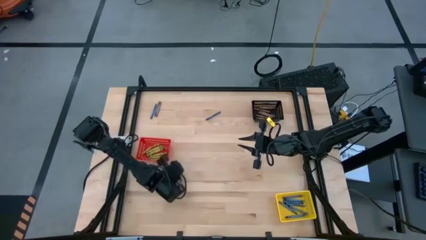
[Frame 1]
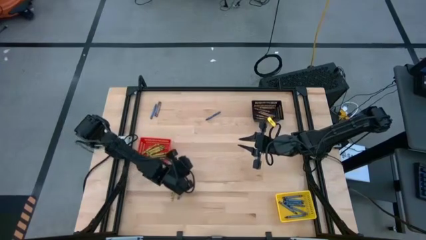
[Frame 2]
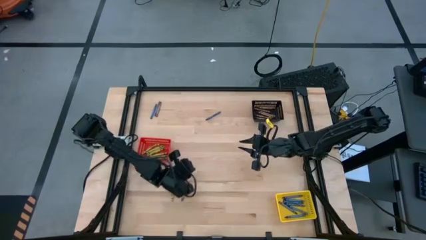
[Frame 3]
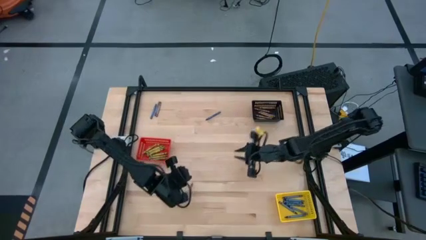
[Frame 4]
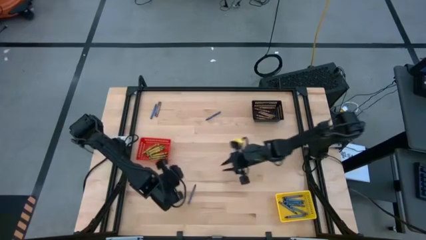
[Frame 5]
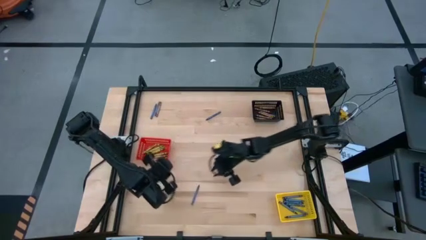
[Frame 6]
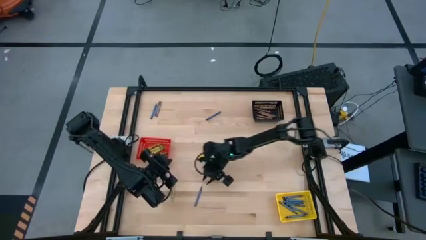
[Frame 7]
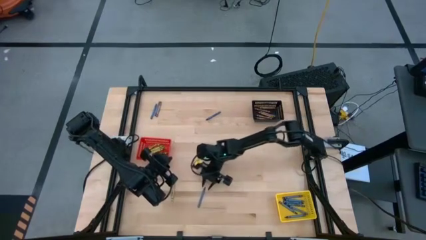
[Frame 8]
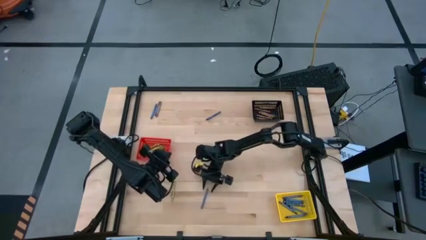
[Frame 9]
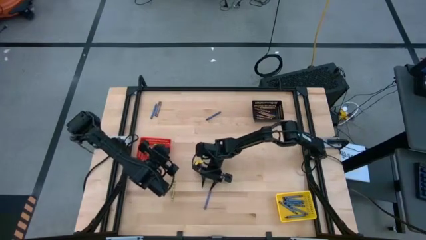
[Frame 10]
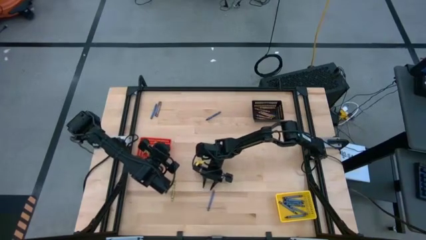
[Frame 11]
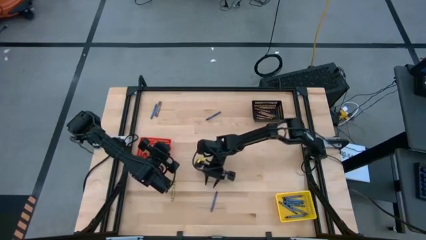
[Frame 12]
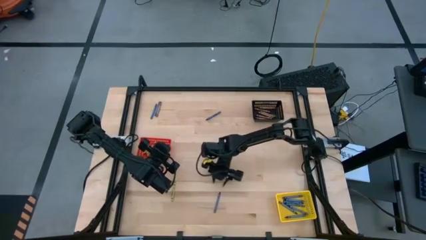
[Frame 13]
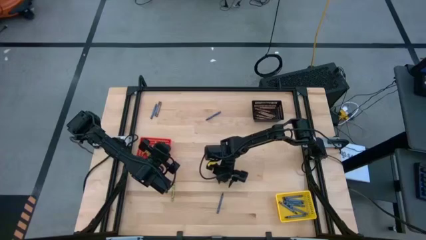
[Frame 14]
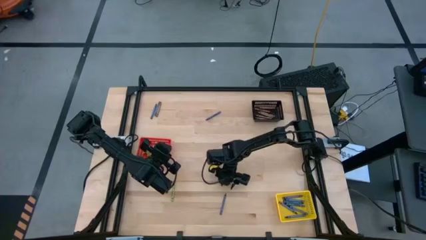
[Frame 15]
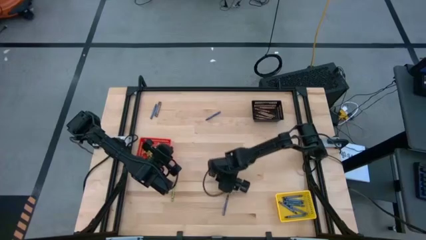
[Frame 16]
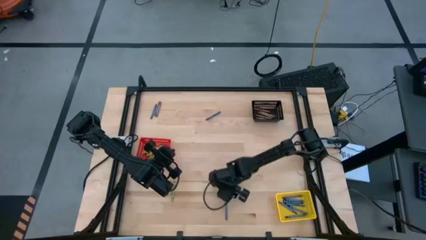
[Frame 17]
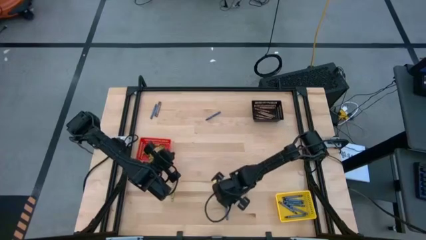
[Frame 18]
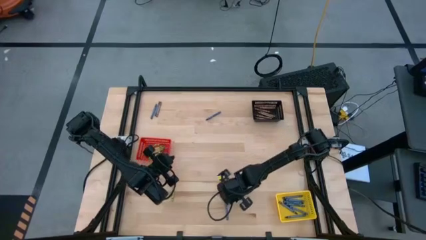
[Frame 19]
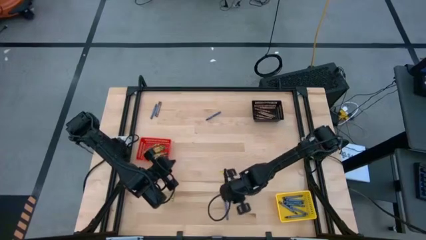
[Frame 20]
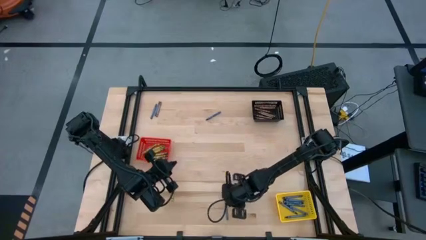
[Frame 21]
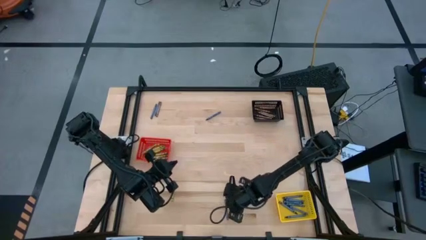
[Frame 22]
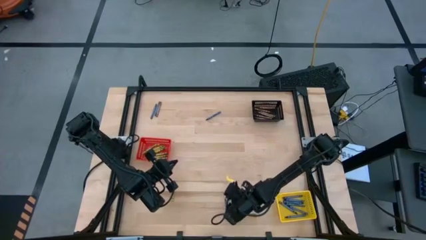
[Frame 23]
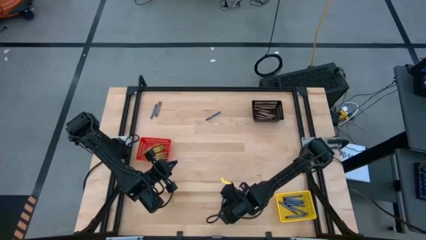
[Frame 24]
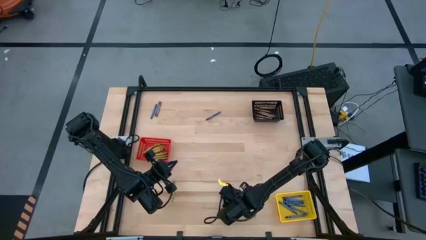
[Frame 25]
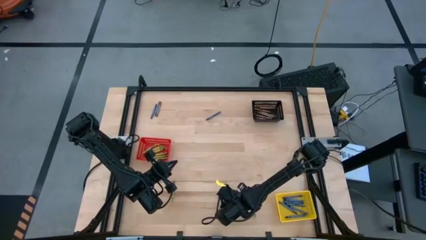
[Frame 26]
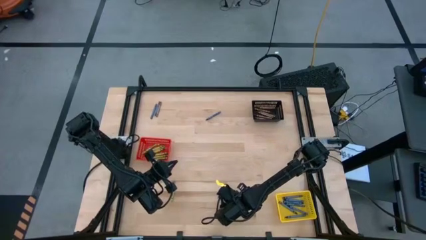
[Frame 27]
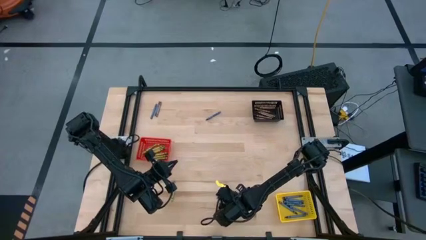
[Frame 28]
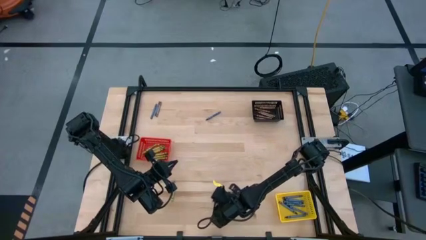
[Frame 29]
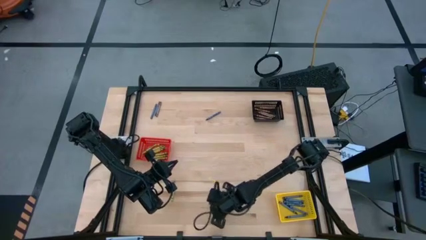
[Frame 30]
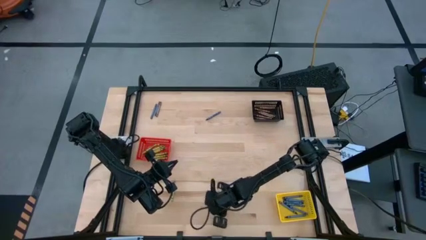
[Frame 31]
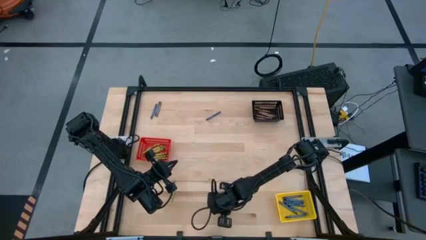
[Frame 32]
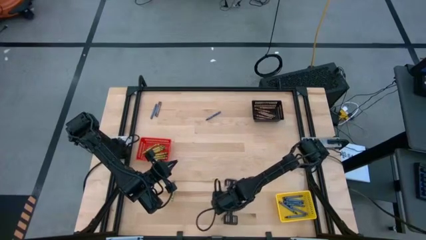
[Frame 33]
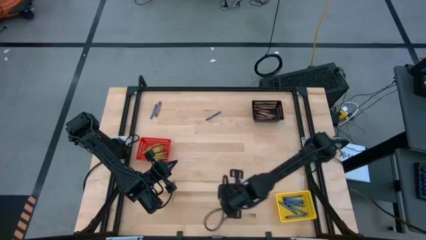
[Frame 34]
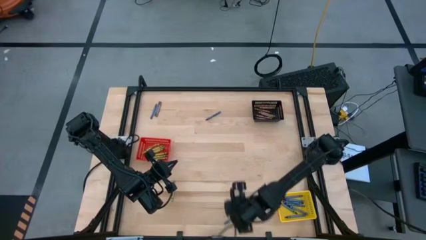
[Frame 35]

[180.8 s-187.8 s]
Task: Sort crayons
Put the blue crayon into the yellow bin

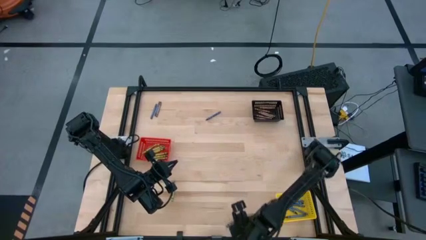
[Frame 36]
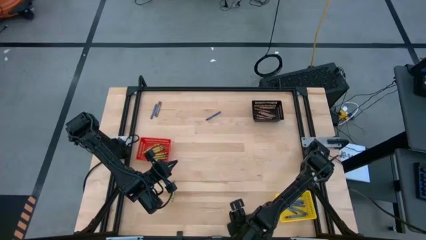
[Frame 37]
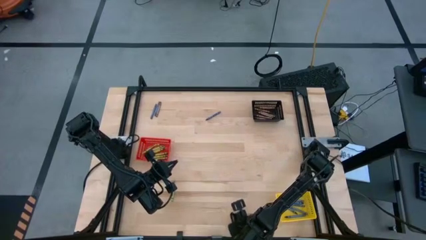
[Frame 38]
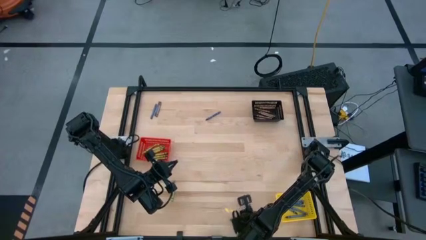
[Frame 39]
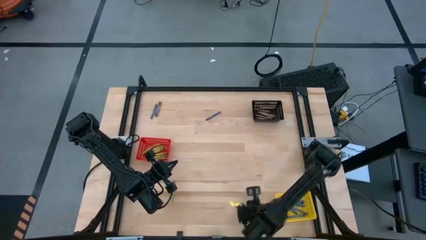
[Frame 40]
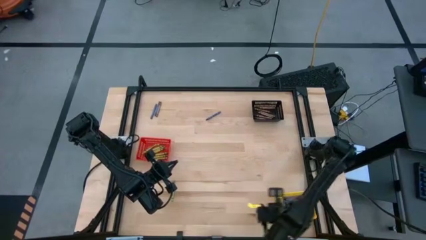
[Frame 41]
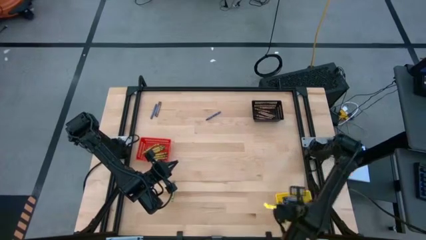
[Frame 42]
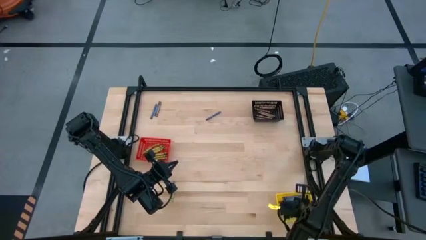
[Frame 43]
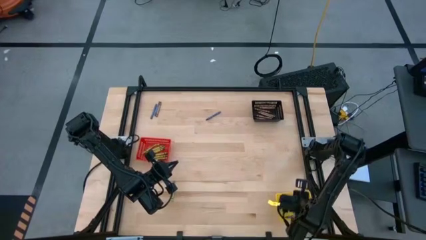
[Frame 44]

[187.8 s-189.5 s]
Put the blue crayon into the yellow bin

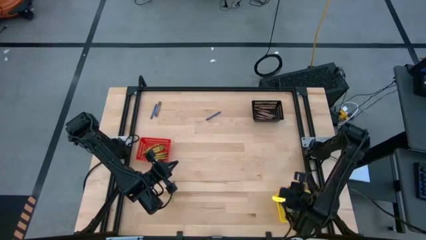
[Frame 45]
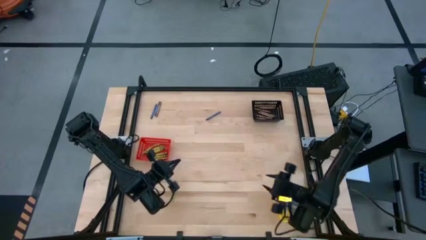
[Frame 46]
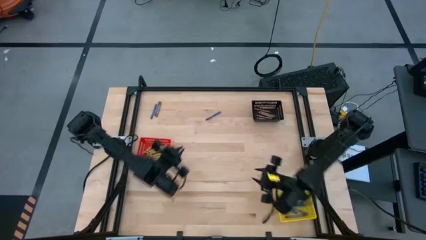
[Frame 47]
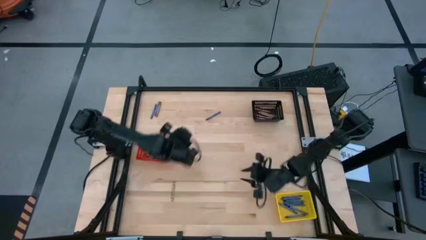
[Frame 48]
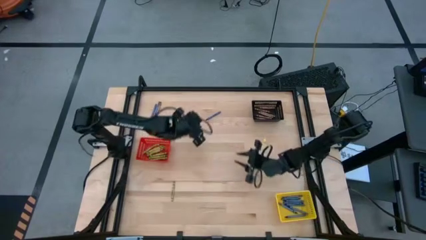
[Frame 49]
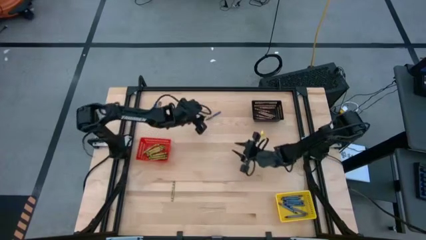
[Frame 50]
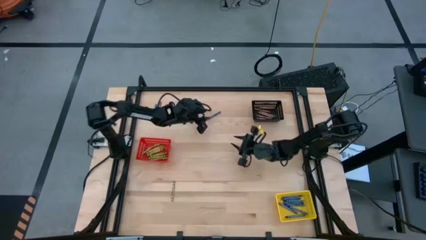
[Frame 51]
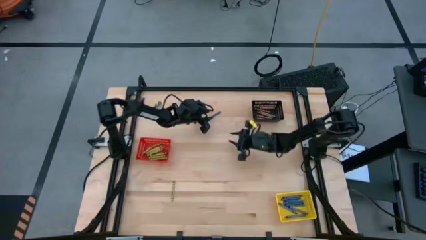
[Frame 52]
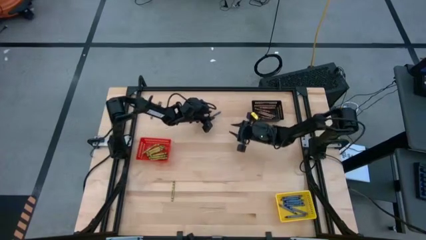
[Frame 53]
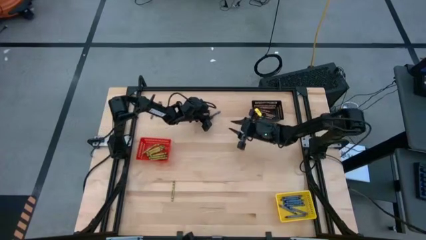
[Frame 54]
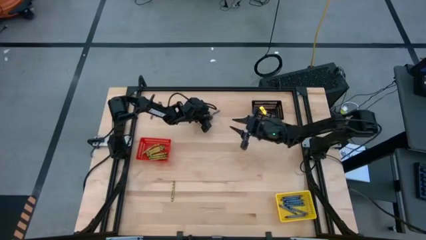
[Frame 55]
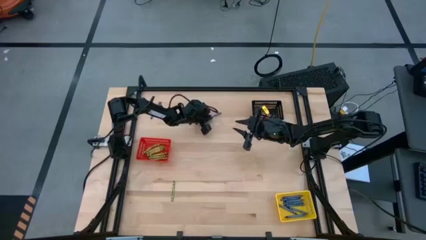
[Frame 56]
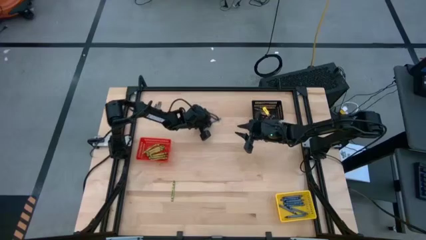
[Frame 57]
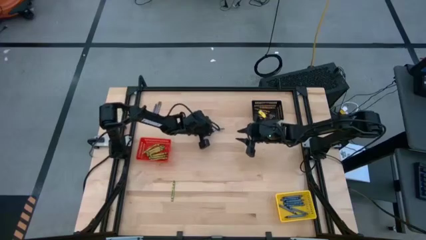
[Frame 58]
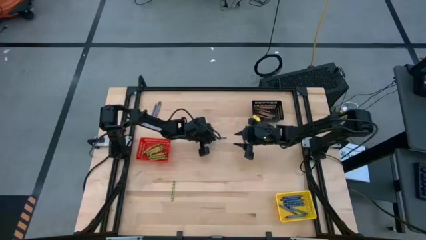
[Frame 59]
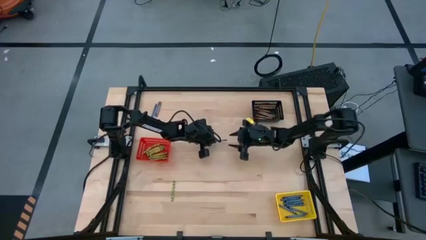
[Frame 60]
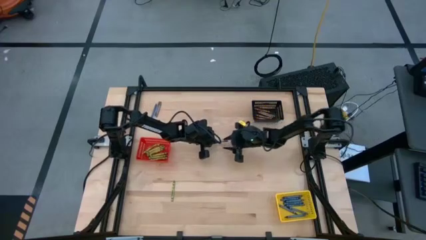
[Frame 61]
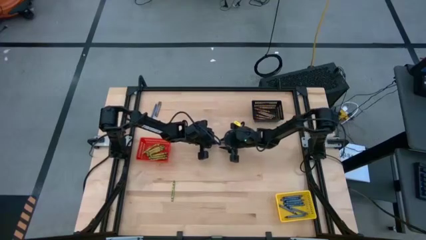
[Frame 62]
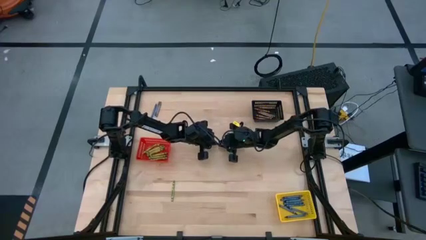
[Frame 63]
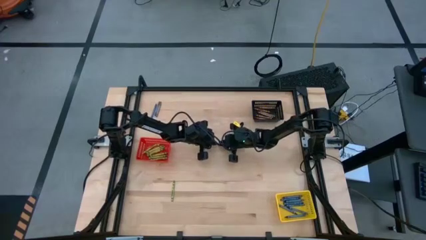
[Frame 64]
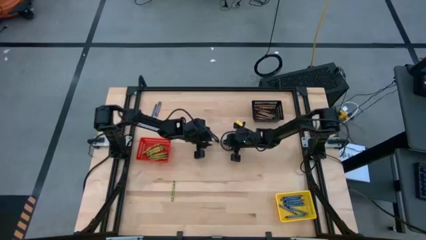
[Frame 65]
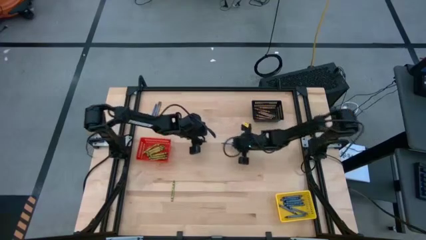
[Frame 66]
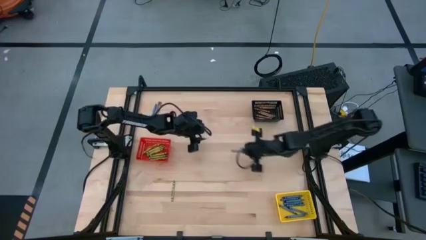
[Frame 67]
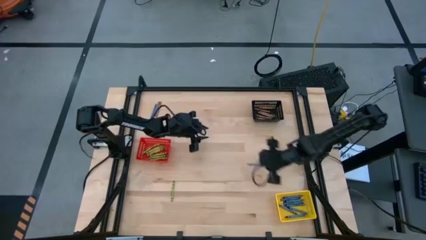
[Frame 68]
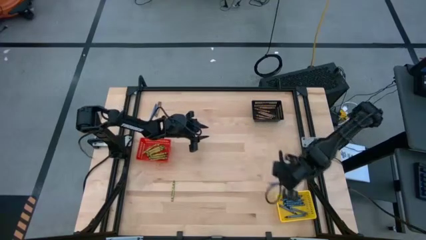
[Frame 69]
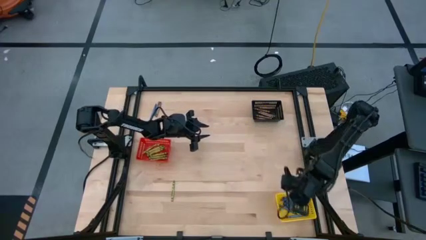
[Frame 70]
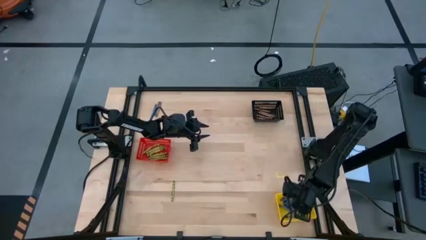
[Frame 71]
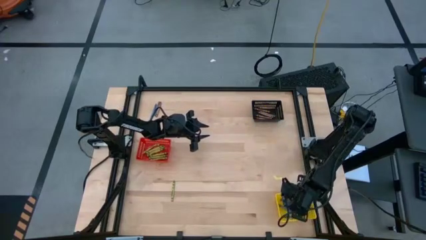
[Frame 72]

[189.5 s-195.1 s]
Put the right blue crayon into the yellow bin

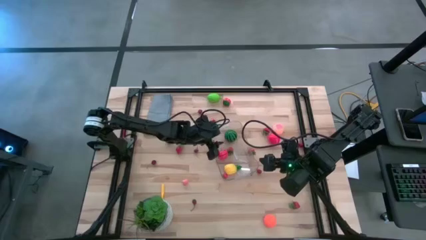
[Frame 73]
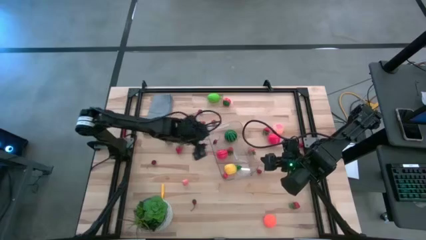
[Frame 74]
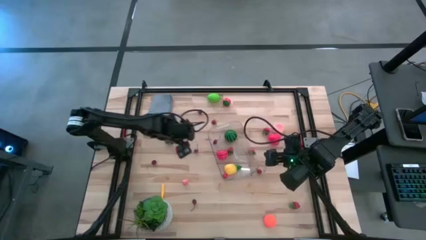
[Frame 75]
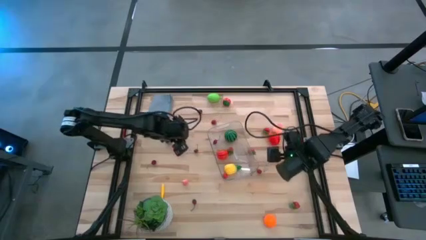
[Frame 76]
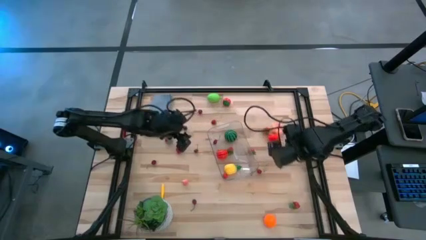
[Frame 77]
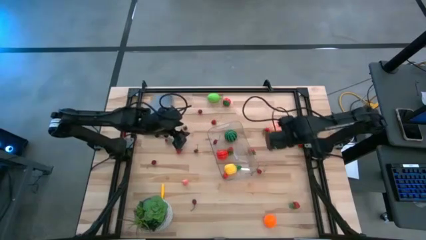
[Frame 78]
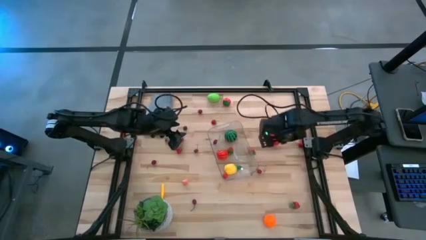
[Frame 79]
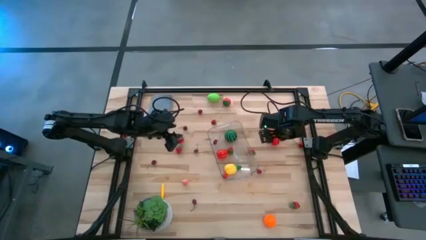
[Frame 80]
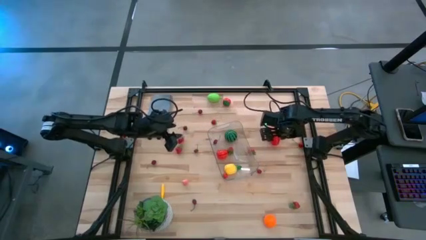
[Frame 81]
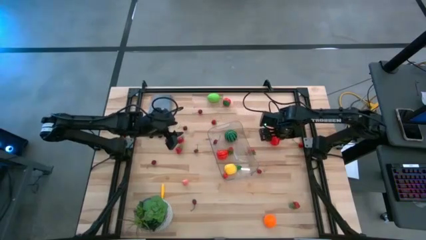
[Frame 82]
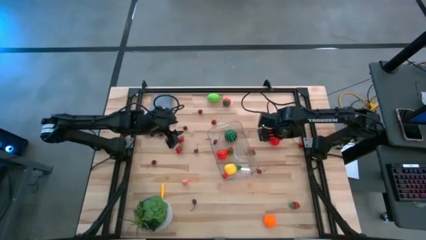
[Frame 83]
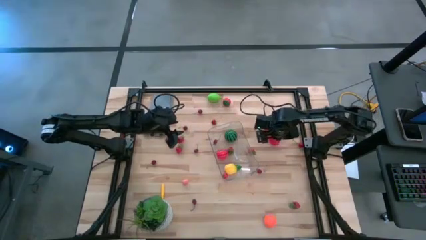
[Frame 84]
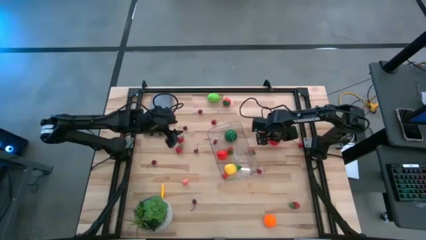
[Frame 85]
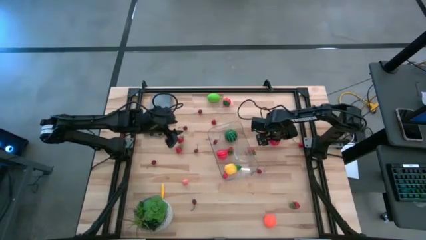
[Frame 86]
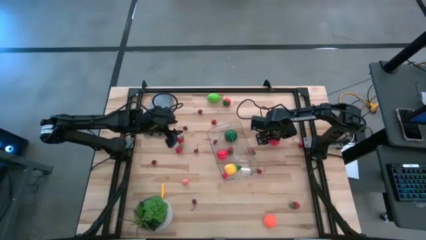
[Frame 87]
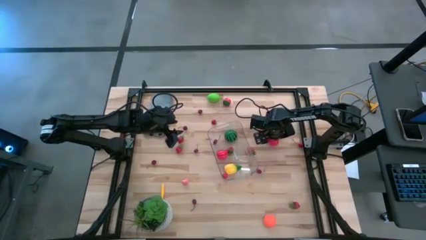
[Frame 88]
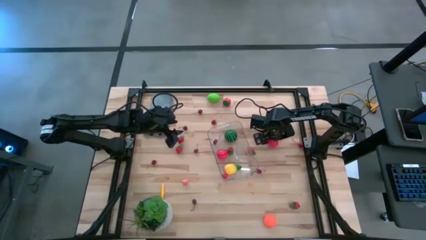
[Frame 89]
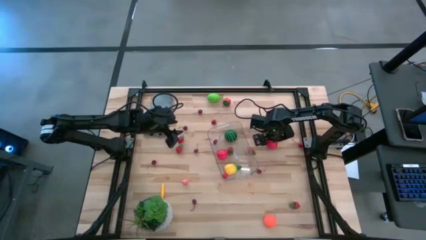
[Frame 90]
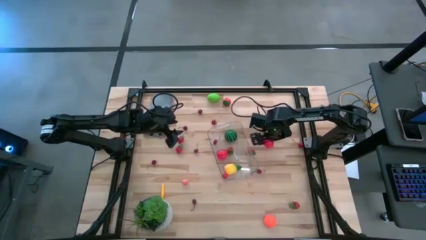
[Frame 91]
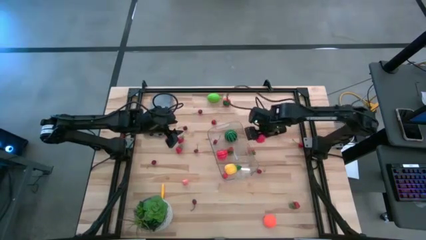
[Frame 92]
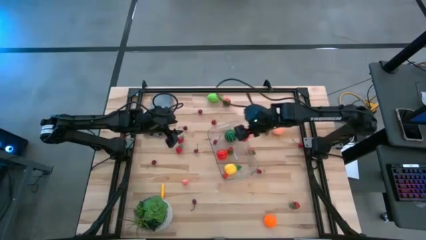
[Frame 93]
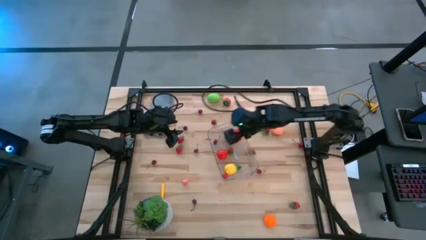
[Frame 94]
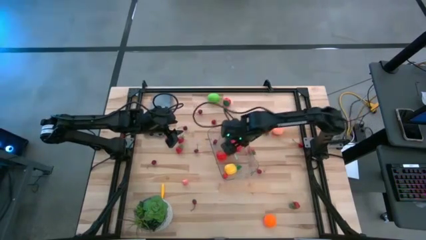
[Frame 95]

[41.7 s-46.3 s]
Task: Pick and placing Produce into tupperware
Put the red apple into the transparent bin
